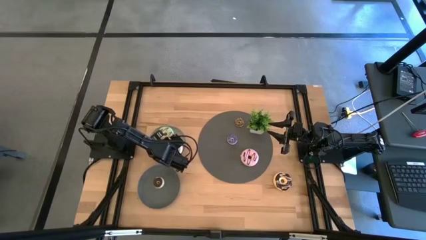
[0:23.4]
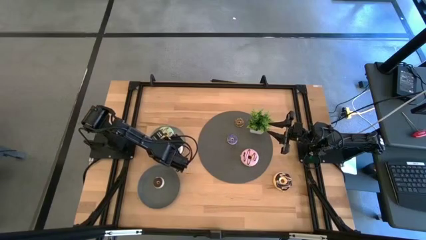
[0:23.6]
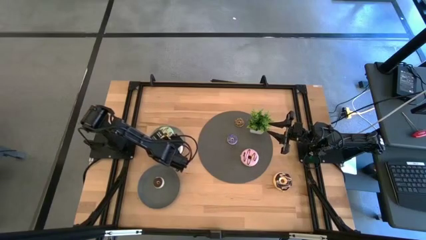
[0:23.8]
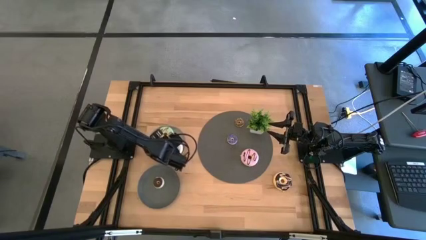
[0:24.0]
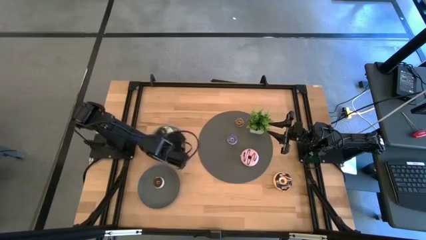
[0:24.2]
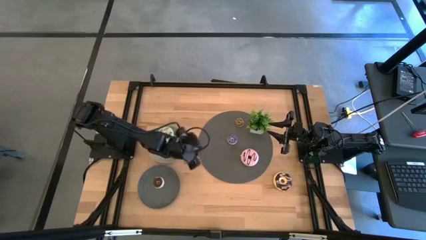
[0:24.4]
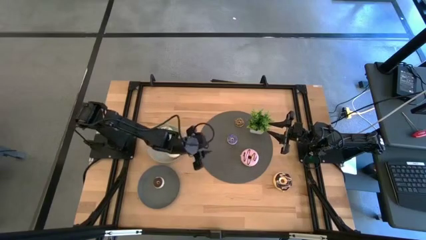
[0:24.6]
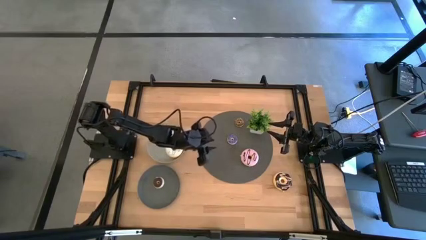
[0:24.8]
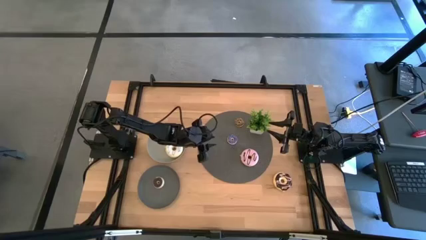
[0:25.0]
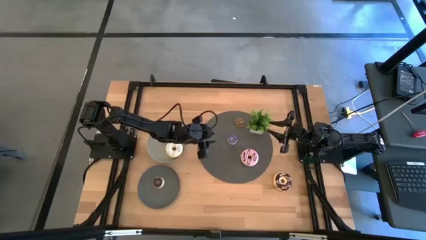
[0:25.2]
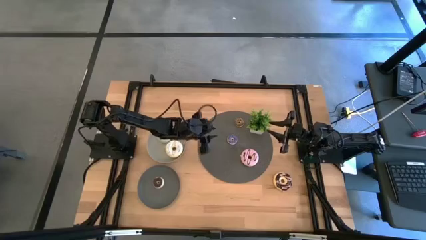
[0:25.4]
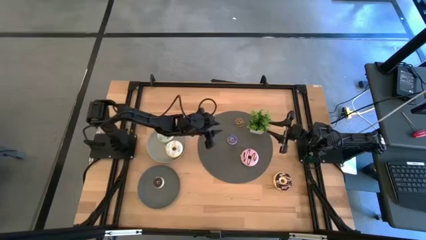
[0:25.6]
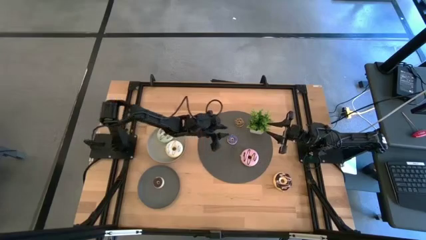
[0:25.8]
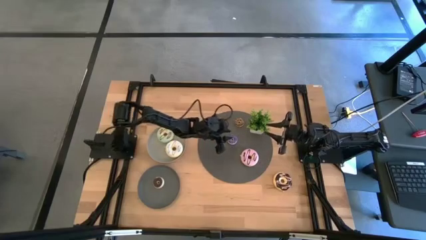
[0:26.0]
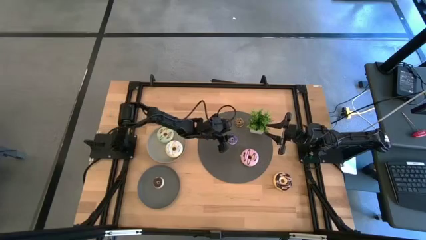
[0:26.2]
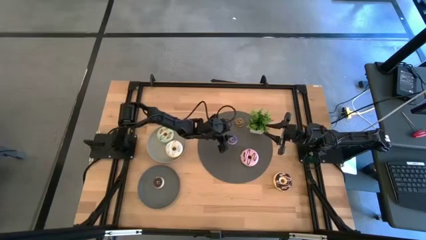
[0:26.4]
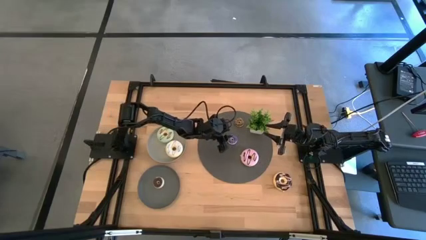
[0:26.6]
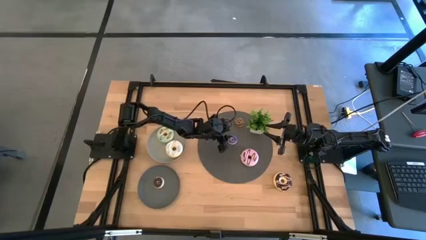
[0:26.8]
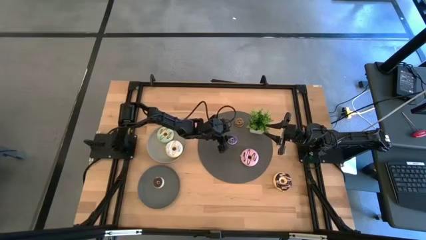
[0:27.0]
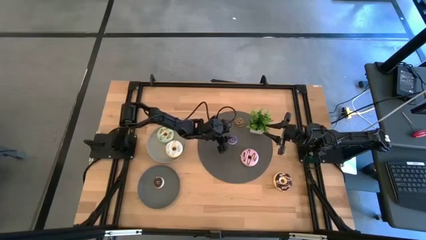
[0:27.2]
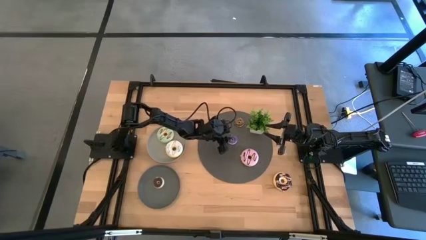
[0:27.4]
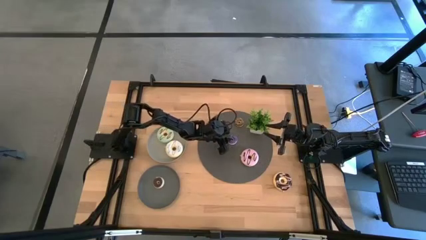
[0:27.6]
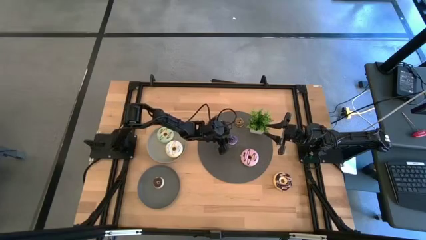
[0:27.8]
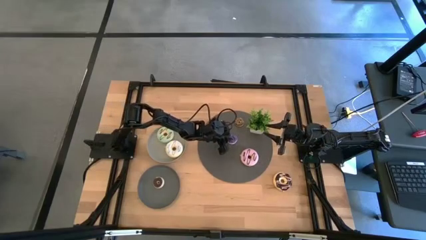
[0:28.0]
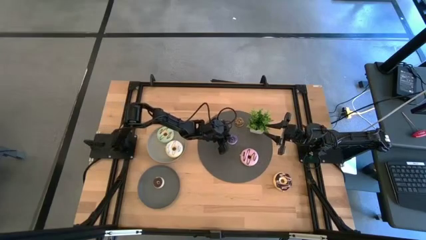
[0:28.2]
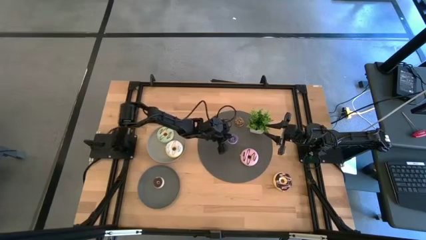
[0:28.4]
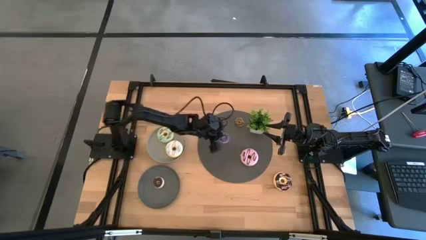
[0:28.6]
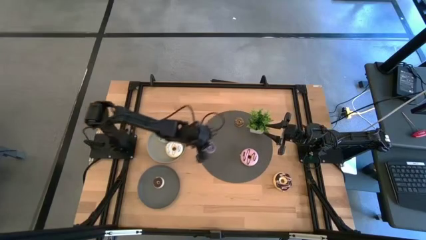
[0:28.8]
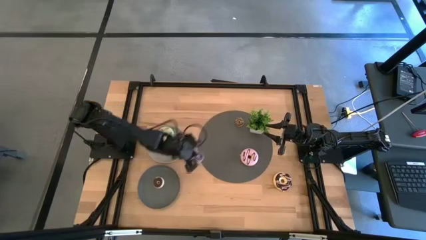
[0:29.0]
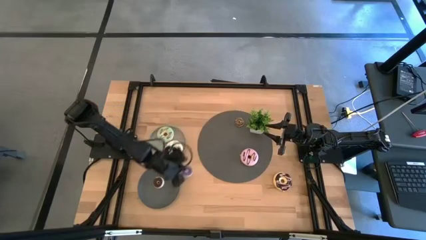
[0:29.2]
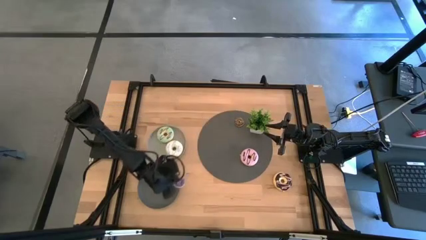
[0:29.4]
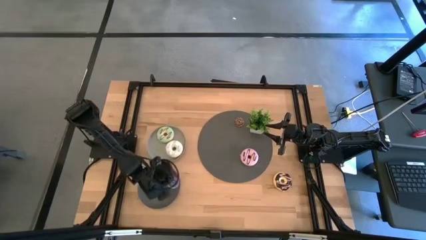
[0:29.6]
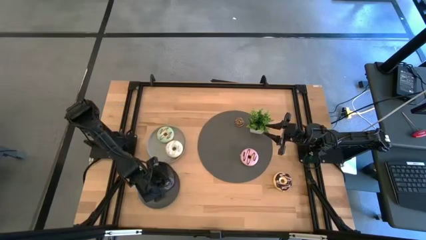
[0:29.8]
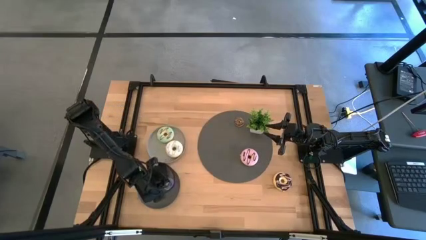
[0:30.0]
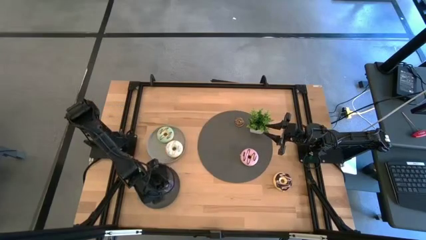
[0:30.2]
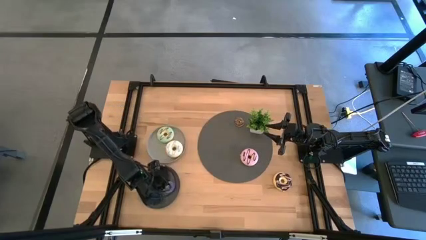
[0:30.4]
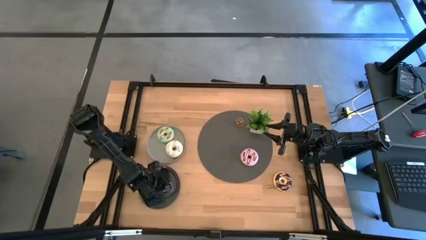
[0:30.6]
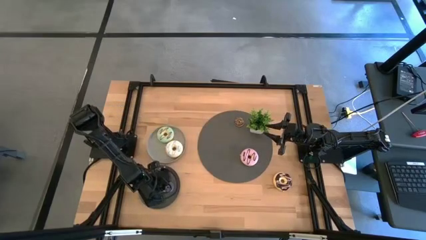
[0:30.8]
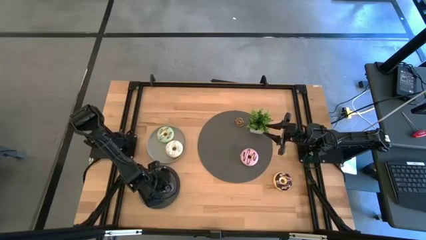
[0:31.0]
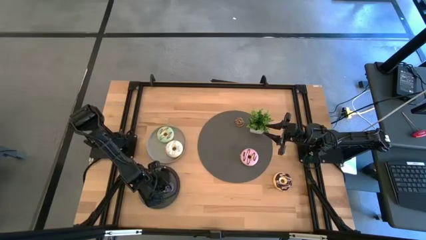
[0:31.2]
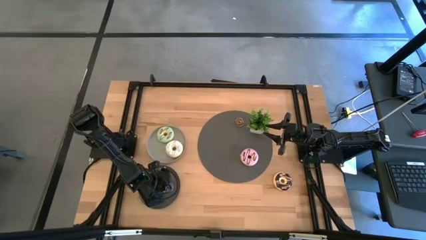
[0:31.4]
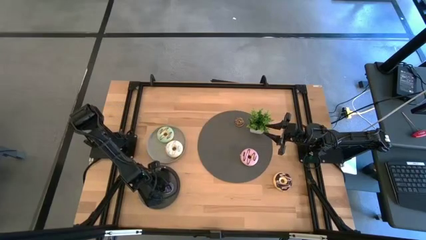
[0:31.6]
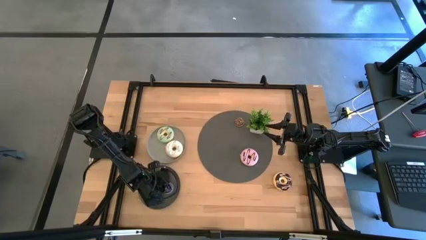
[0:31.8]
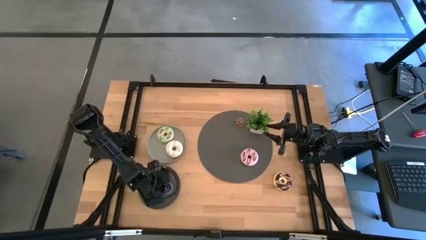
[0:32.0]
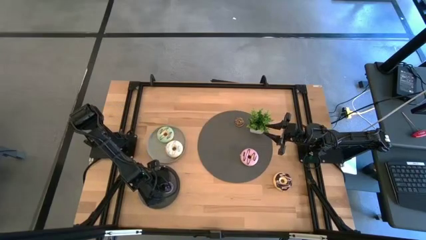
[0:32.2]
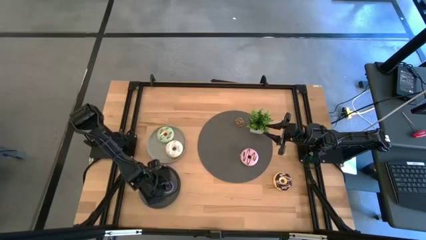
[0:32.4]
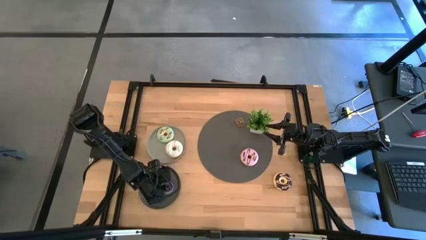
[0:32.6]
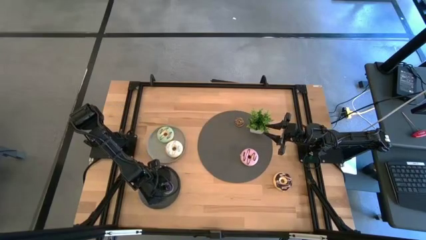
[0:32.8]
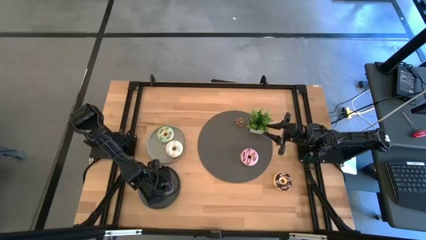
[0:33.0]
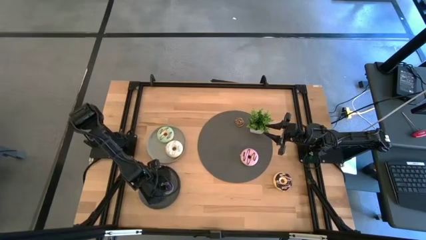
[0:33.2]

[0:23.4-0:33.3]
Task: Pick & Place donuts
Put the small violet donut on the dark gray plate

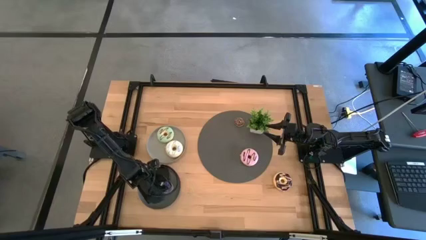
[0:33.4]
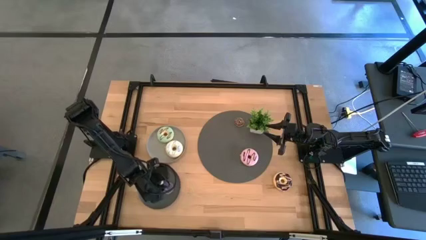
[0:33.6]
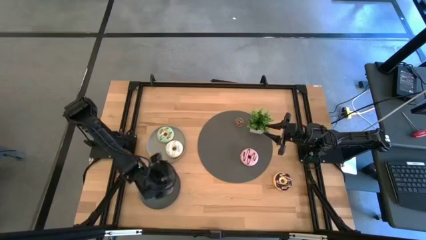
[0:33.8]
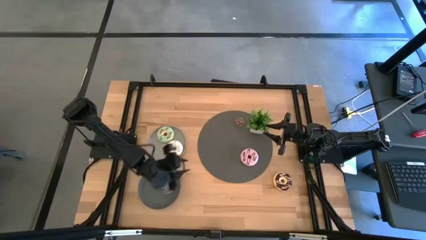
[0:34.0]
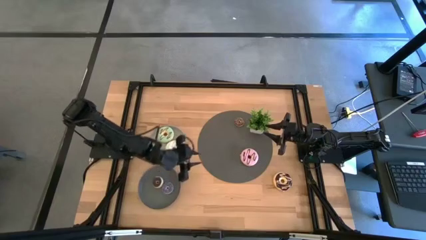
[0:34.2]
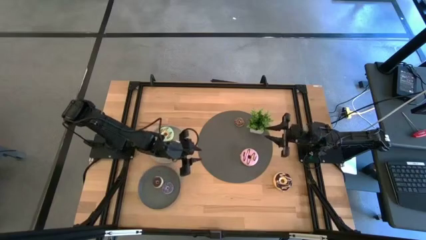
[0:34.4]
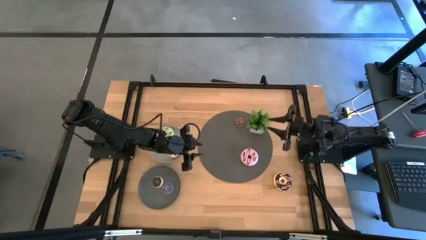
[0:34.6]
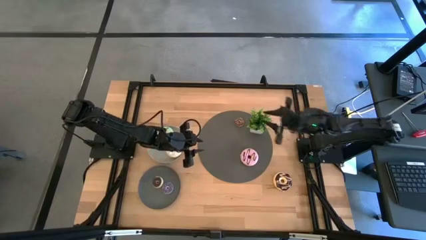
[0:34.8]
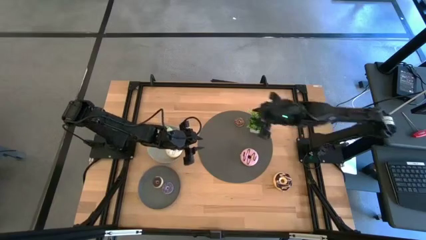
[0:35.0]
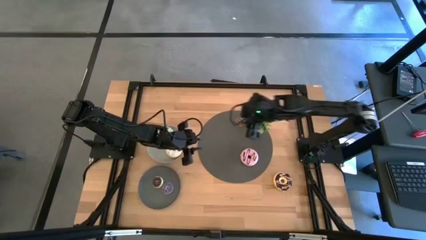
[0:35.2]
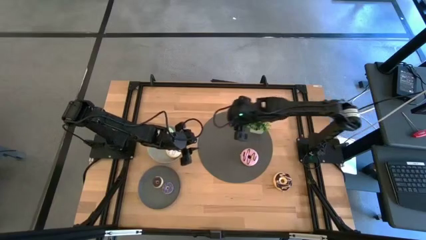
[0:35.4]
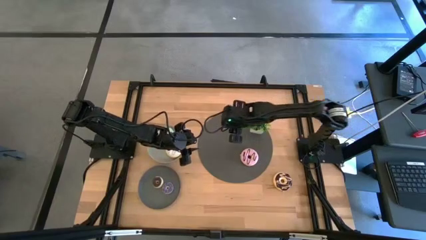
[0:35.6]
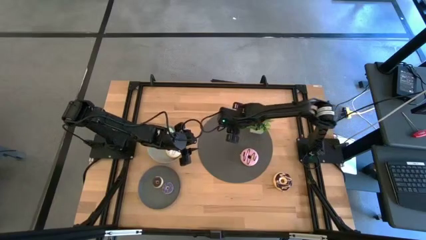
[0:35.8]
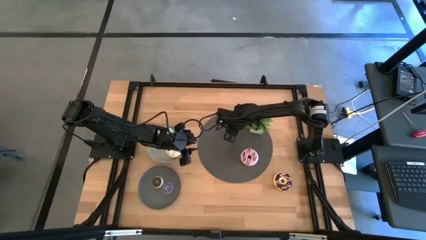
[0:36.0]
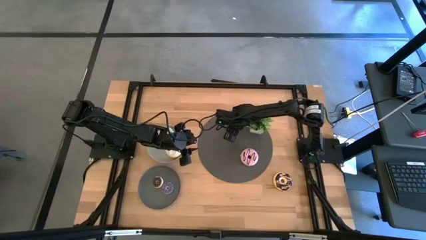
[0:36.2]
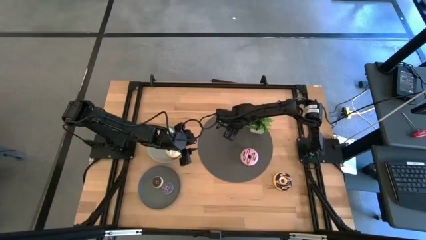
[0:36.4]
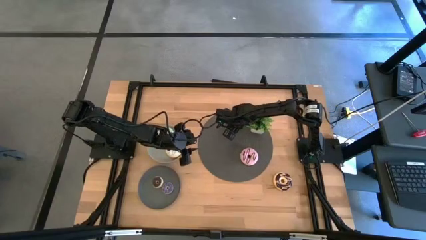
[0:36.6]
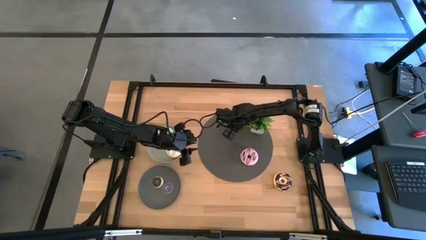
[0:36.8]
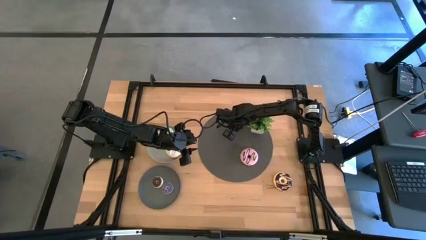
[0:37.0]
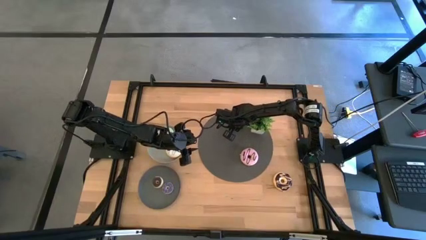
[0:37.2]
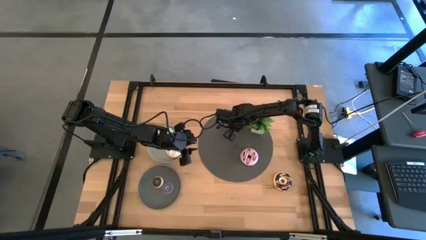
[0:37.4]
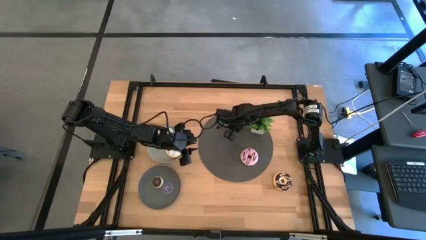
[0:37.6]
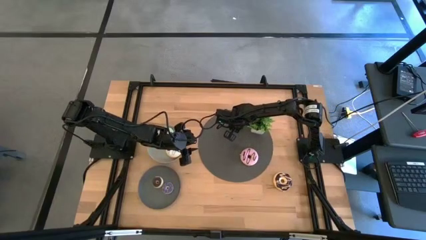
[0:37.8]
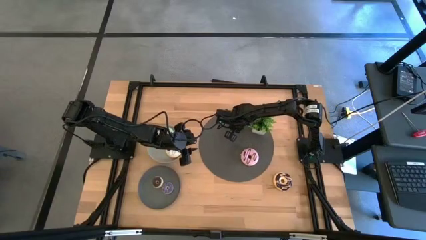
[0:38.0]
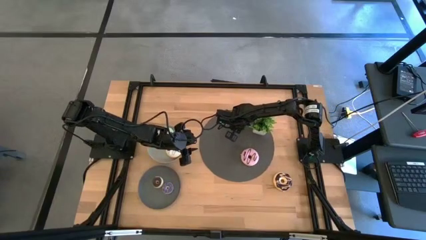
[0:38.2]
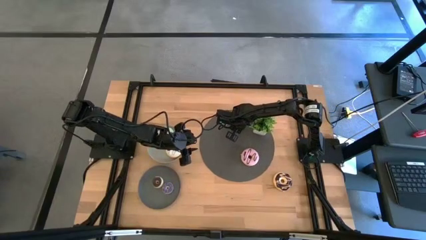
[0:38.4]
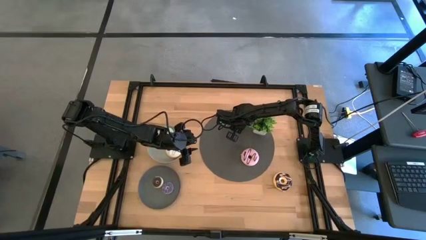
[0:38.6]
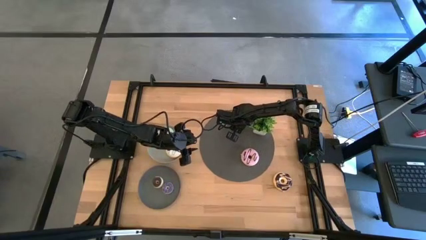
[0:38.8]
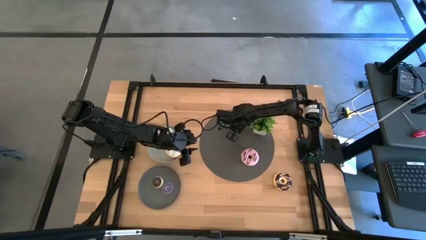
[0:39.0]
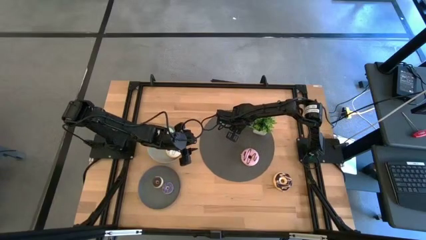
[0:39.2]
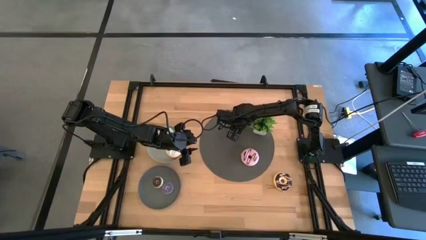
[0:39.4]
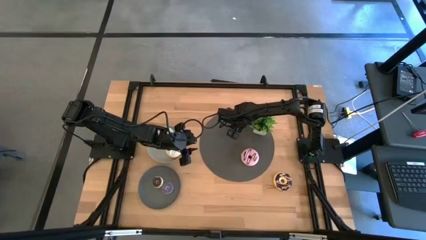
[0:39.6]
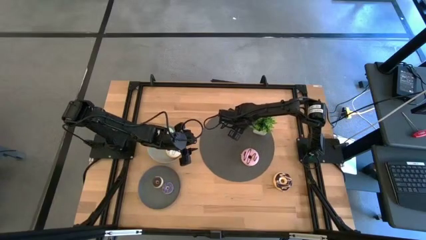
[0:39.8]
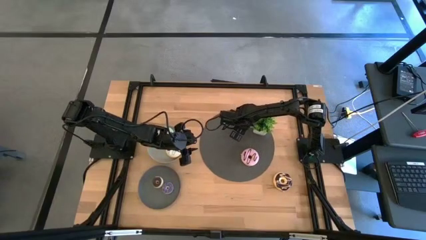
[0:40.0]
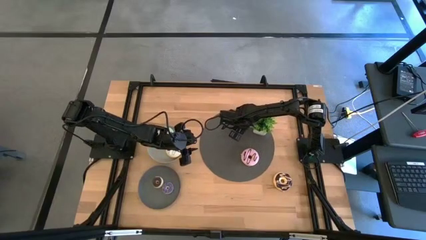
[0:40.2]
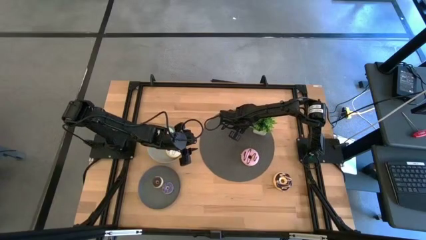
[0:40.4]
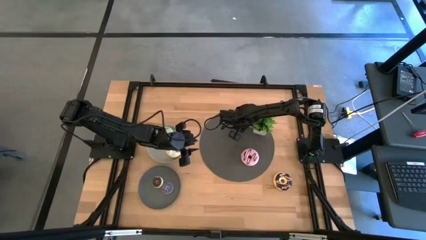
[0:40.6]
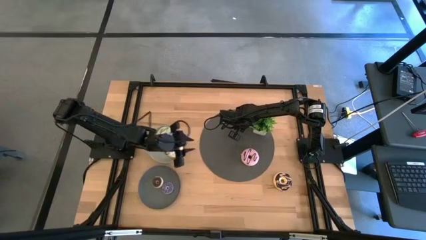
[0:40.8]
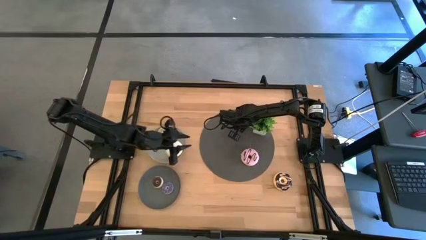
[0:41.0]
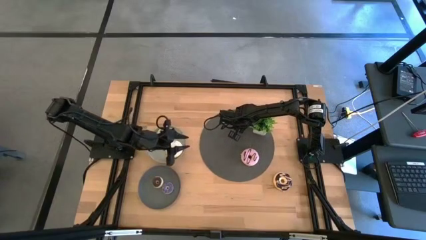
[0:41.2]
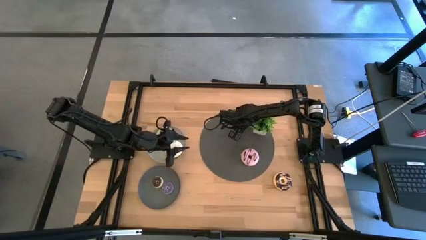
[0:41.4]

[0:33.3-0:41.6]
Put the small brown donut on the dark gray plate
